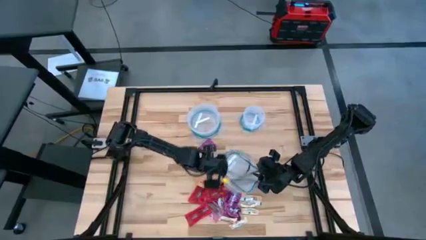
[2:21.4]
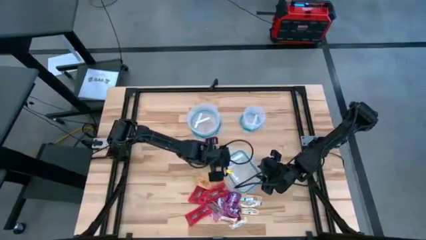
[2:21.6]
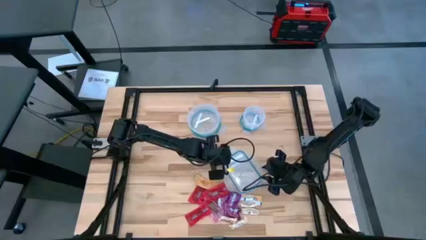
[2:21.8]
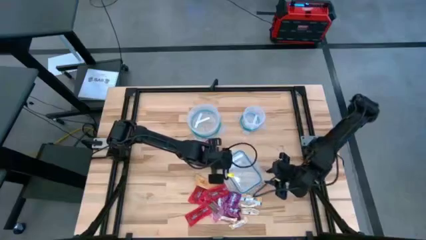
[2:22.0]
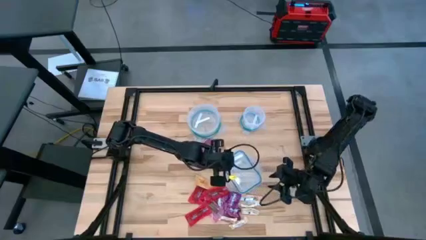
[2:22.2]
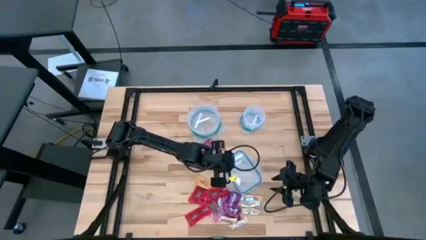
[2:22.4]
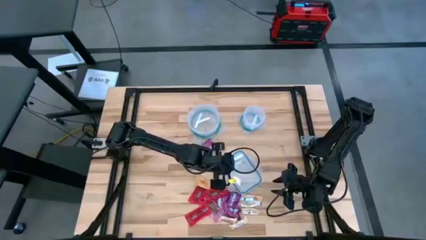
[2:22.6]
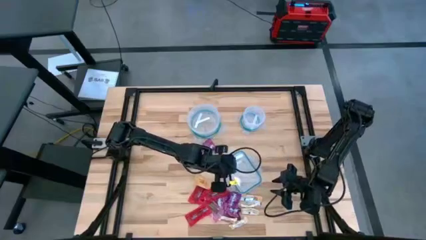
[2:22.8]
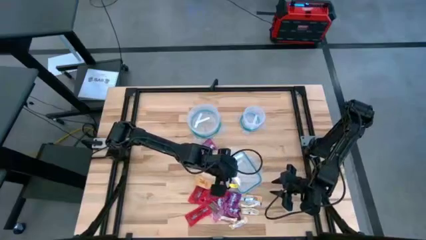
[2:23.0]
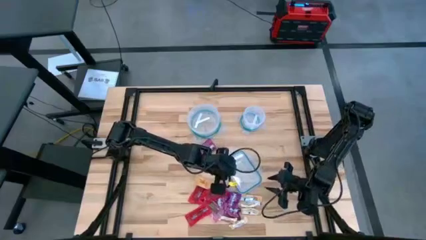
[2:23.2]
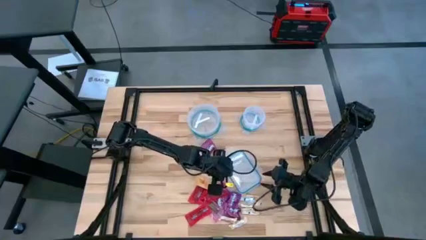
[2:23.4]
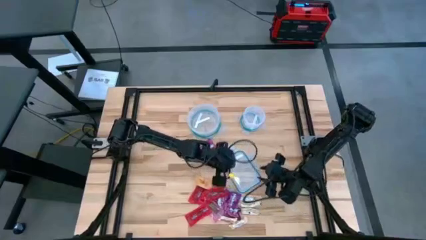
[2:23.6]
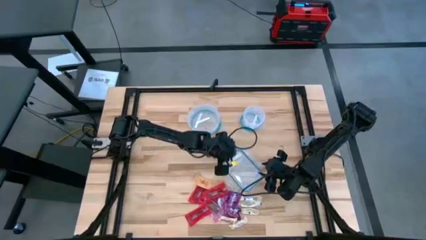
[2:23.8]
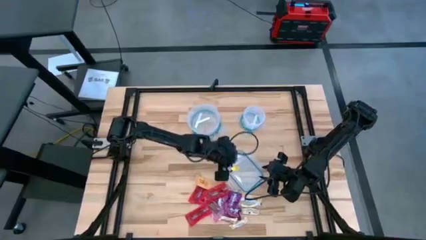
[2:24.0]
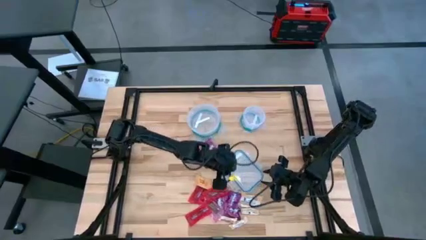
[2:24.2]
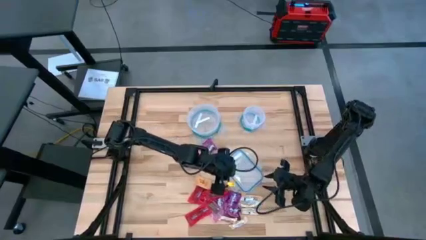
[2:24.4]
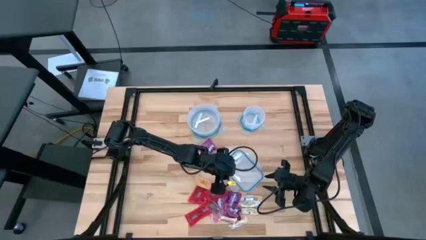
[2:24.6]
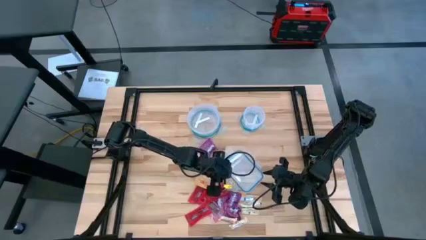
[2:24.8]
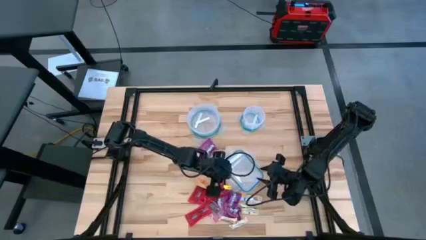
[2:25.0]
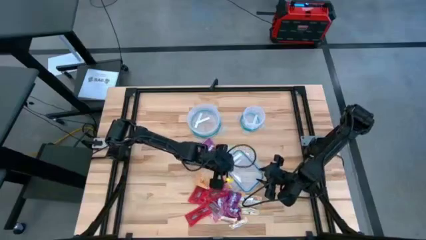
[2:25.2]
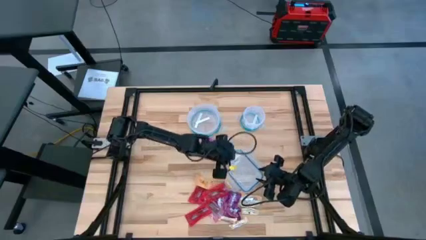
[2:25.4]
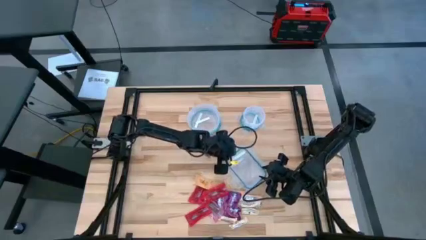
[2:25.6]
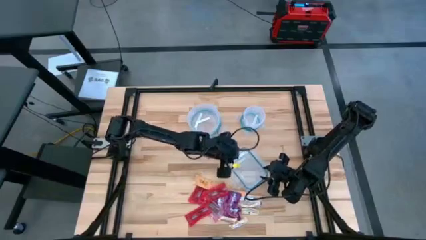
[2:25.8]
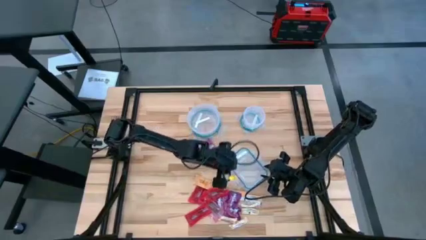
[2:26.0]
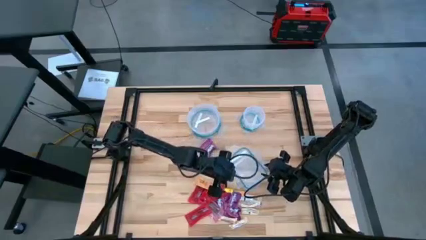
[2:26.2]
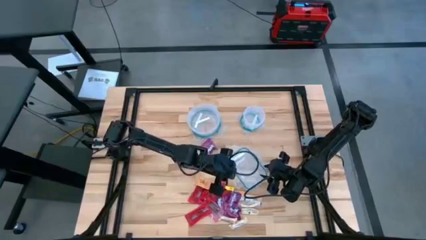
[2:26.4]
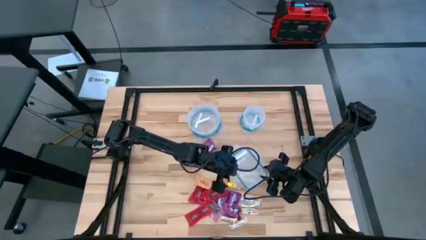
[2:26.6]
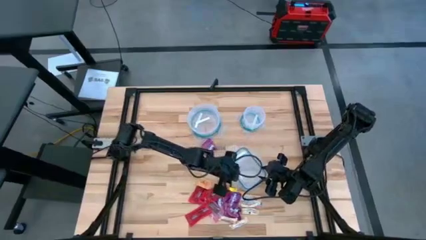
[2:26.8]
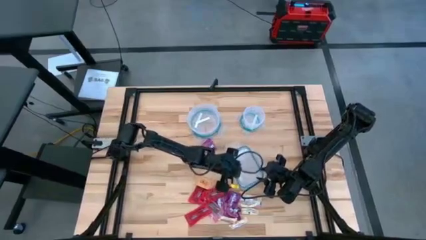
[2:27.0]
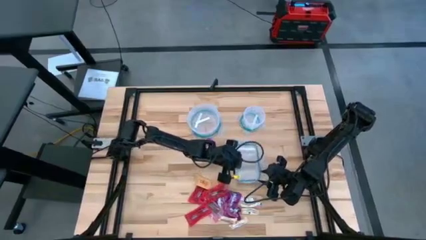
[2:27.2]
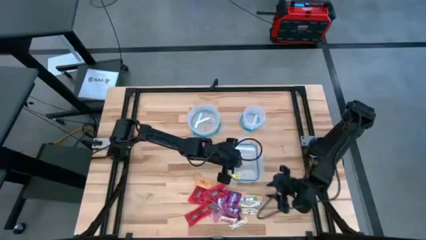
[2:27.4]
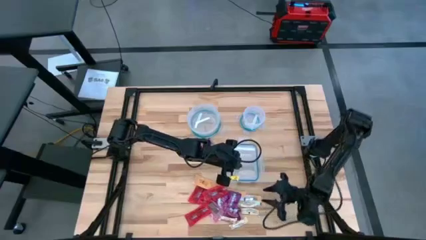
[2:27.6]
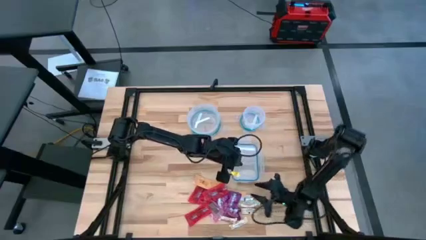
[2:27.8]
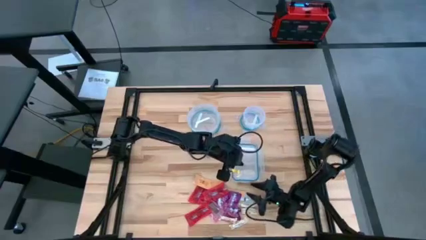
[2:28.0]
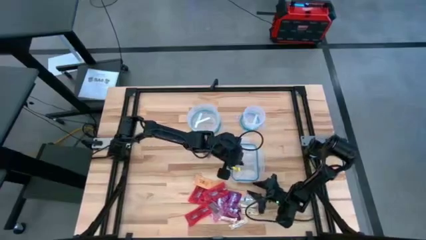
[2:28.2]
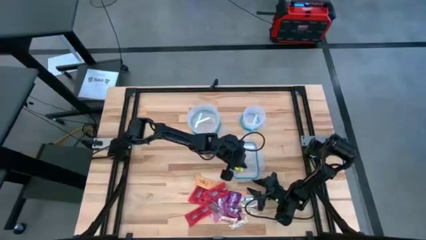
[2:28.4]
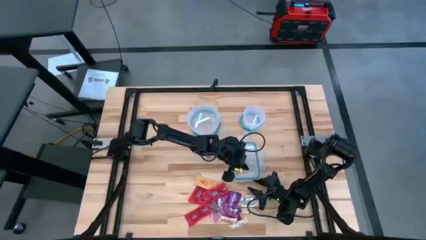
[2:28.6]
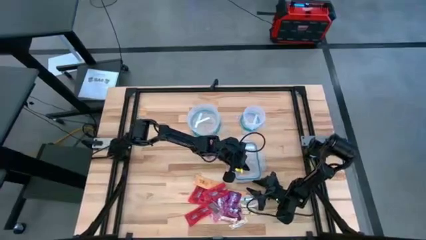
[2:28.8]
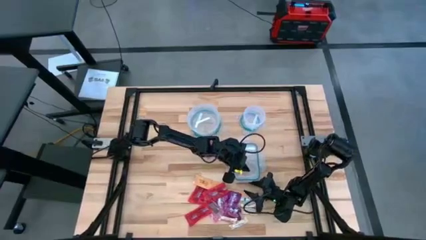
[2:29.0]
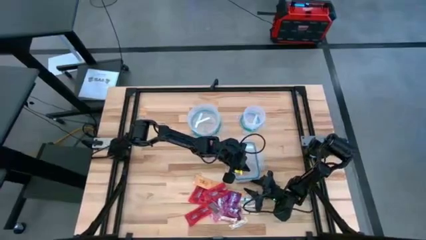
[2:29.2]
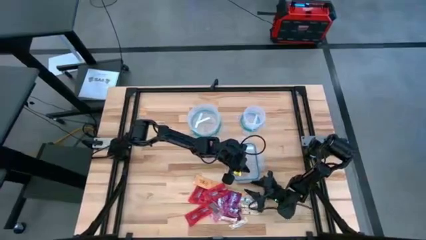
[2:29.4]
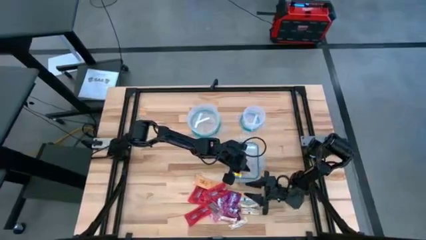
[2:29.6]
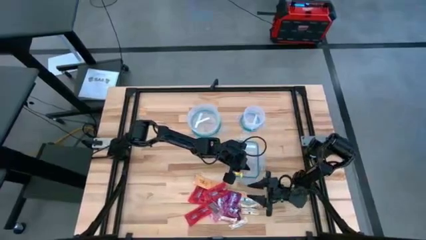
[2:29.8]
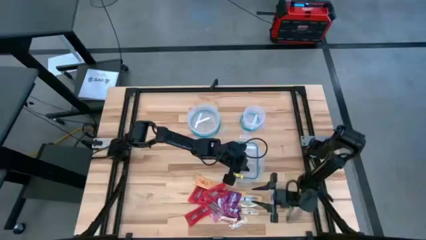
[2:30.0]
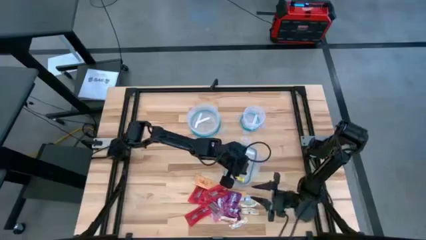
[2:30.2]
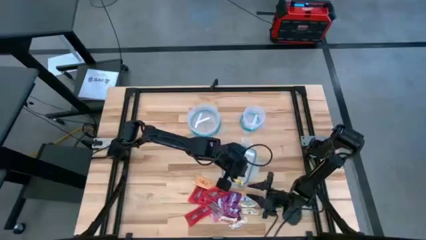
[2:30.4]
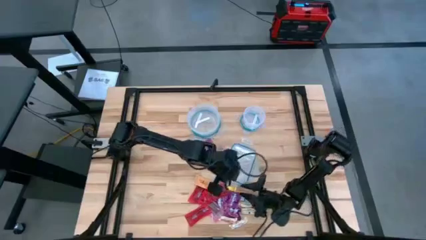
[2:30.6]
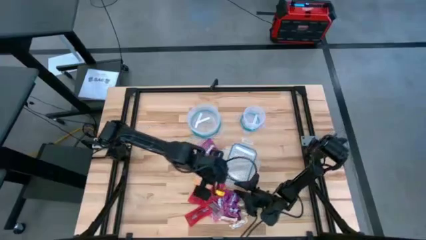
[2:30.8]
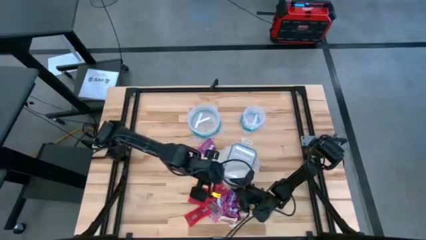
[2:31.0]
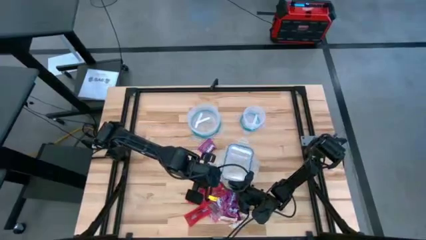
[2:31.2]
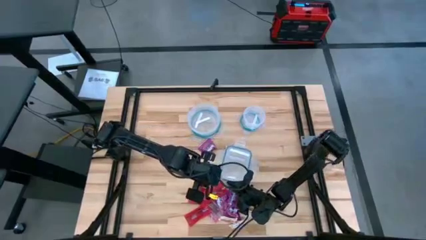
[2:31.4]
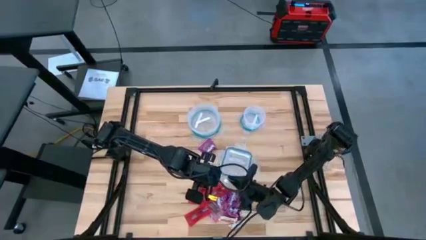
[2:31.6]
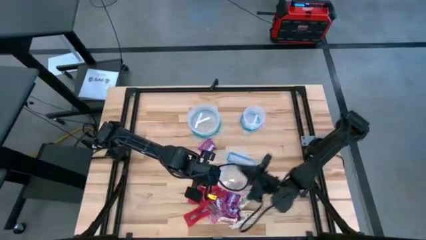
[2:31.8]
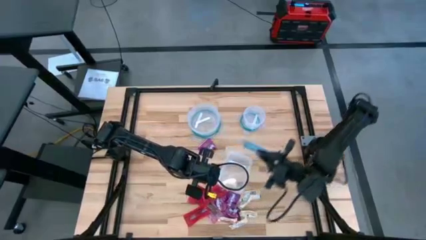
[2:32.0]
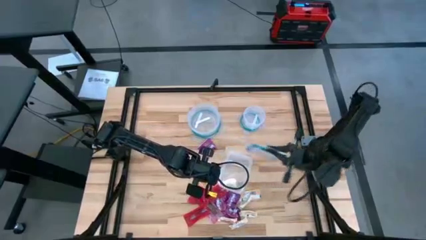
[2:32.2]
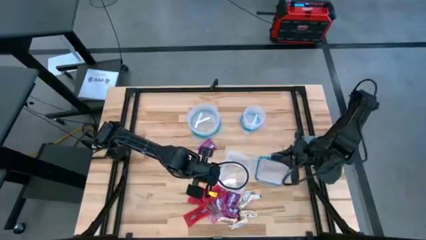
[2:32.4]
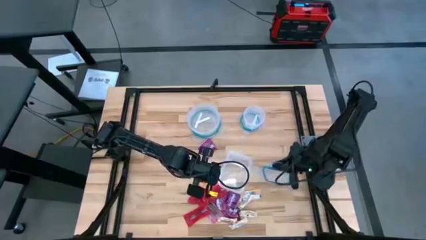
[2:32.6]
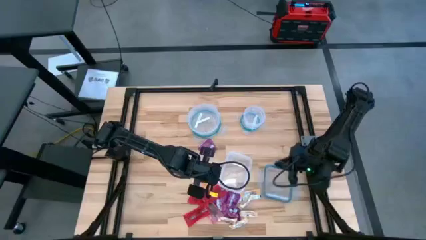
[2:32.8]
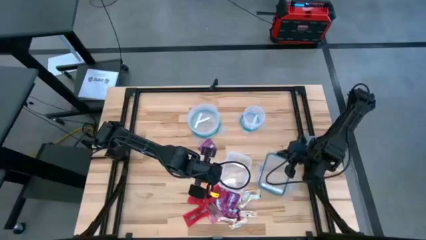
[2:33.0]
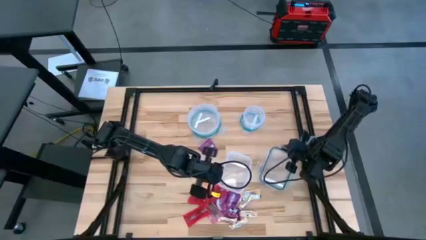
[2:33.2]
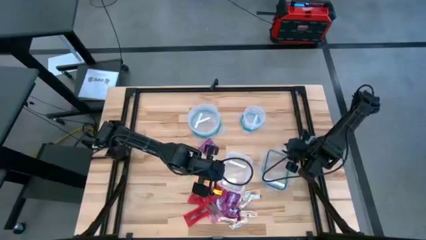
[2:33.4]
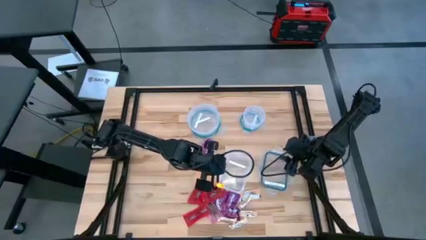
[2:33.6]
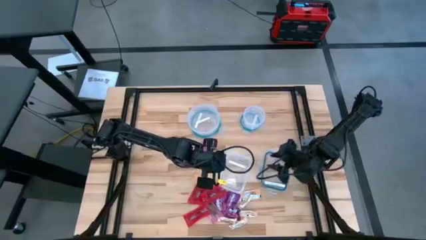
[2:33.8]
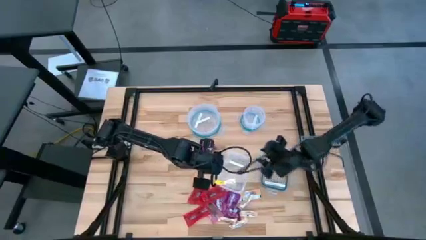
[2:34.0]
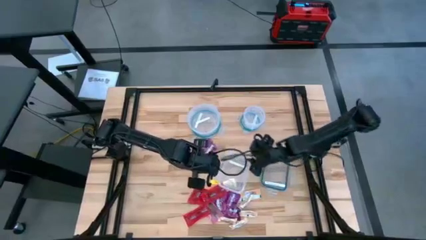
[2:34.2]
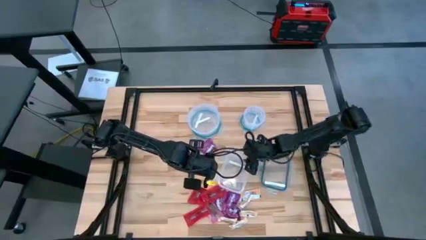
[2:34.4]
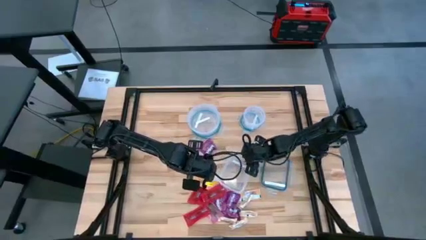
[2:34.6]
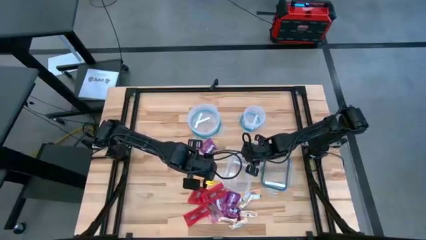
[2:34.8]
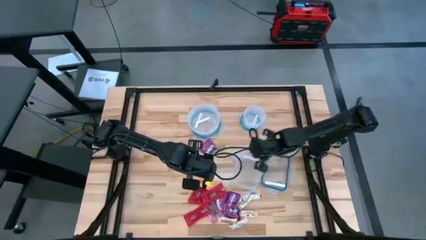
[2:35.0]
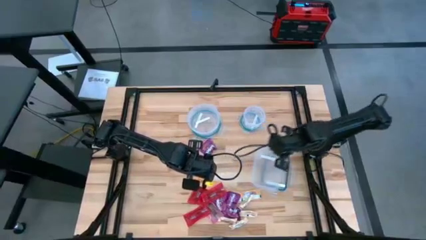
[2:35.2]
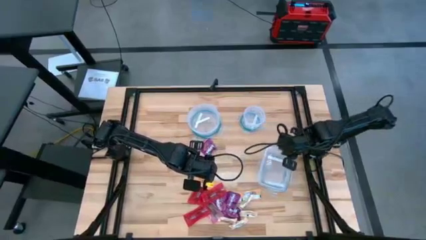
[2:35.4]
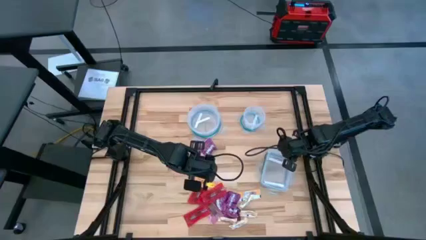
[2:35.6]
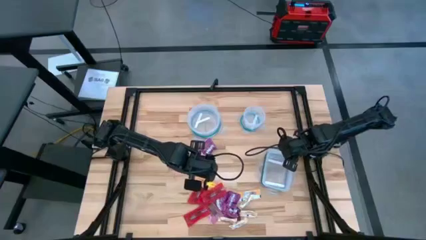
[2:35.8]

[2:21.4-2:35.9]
Task: Sort candy
Open the rectangular transparent bin
